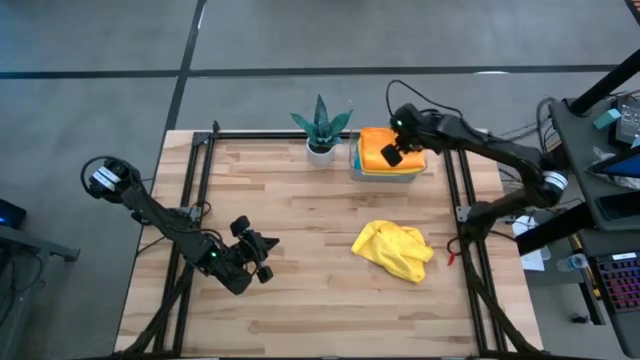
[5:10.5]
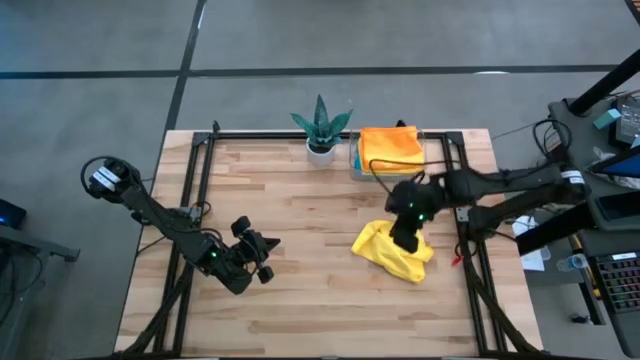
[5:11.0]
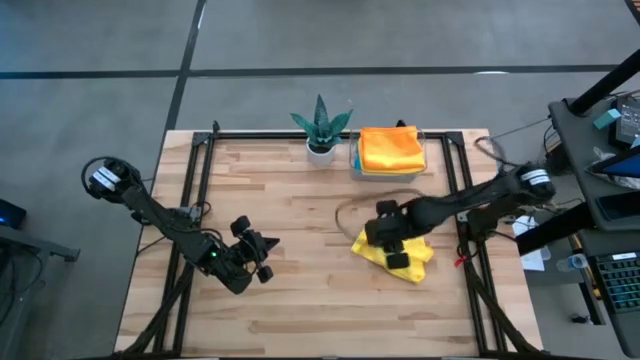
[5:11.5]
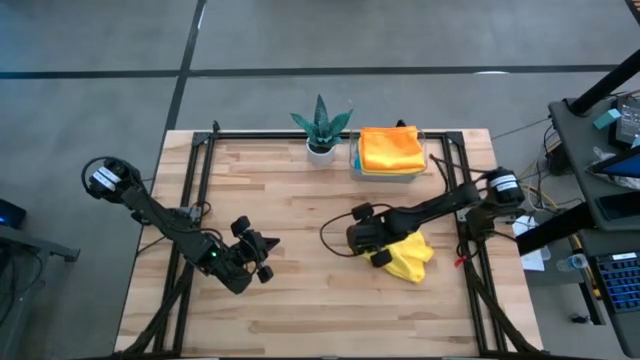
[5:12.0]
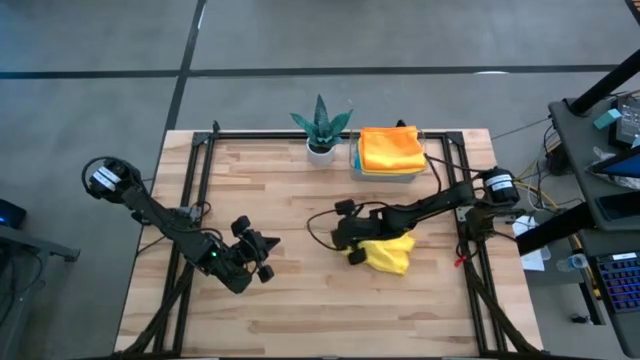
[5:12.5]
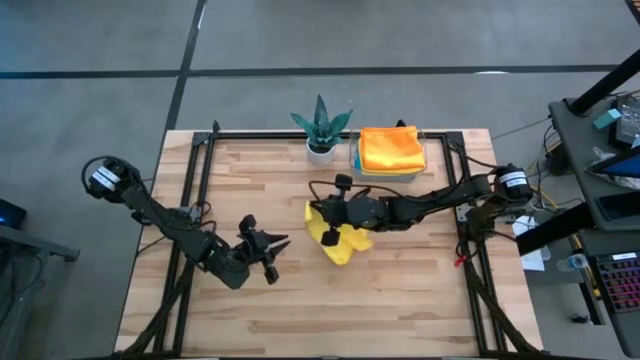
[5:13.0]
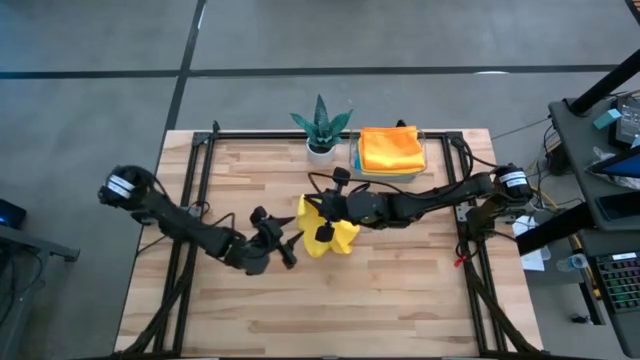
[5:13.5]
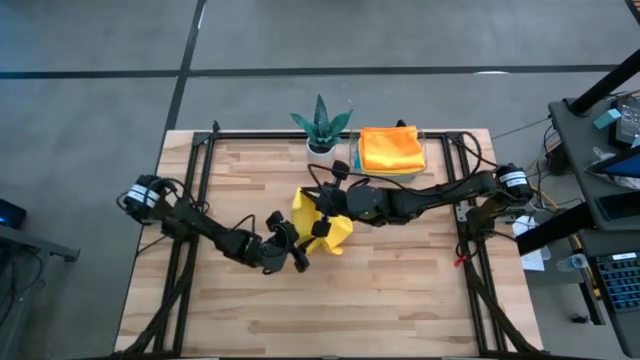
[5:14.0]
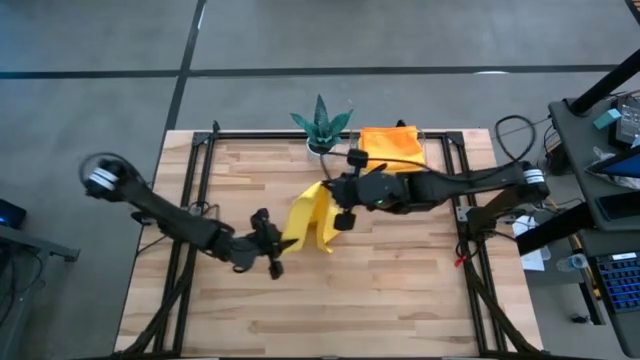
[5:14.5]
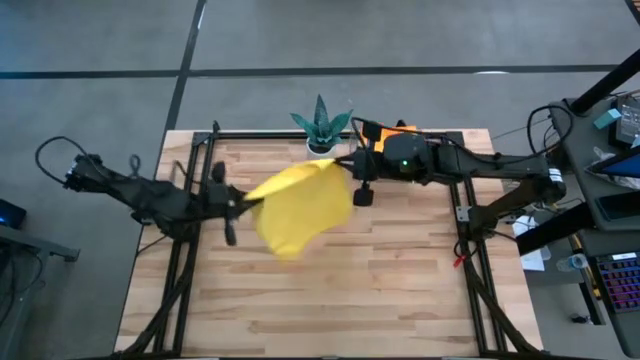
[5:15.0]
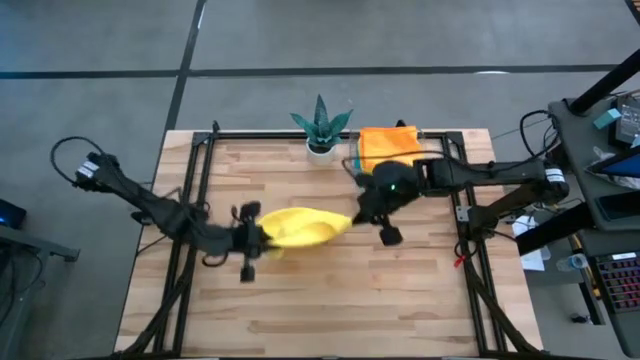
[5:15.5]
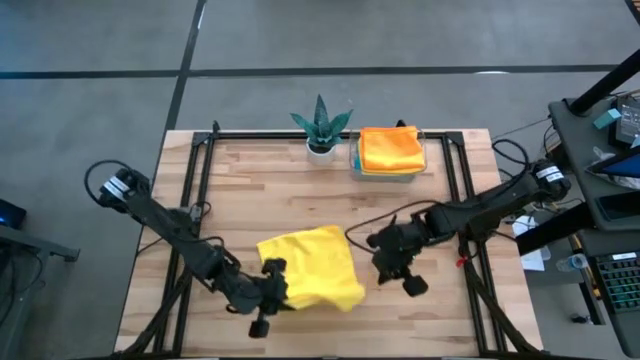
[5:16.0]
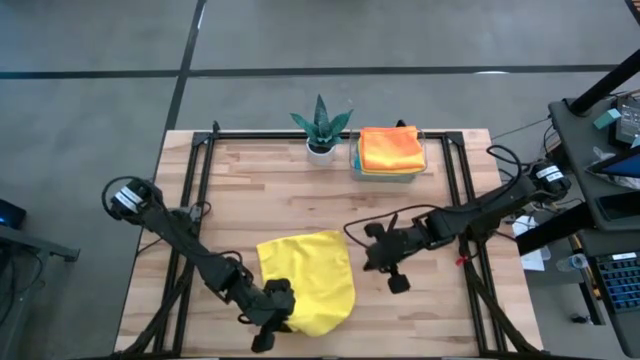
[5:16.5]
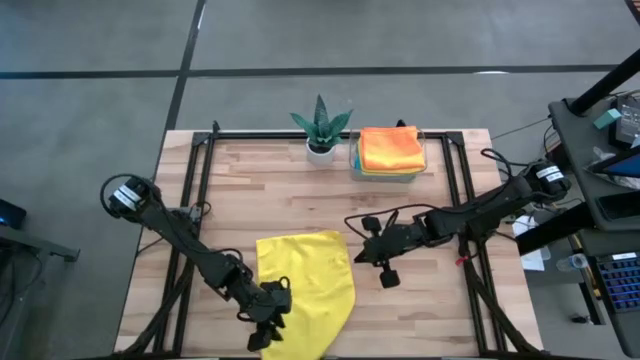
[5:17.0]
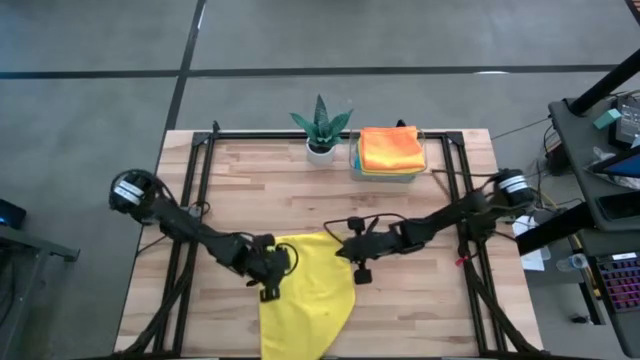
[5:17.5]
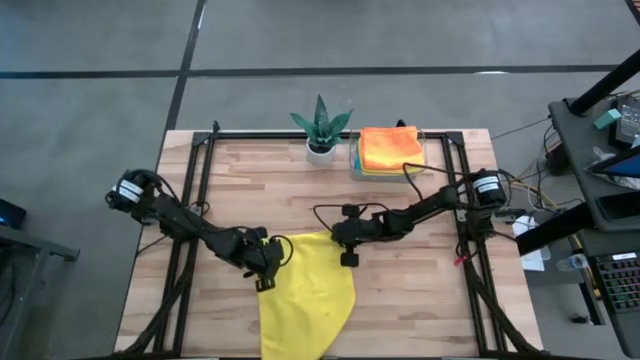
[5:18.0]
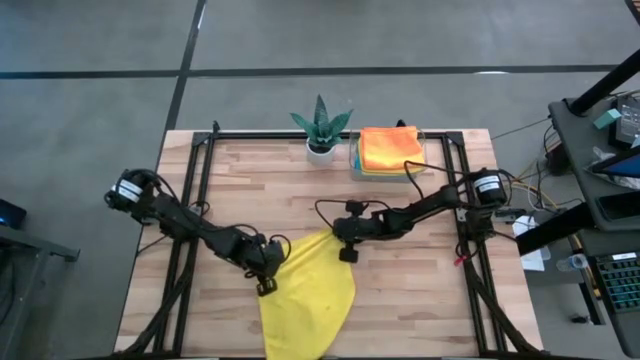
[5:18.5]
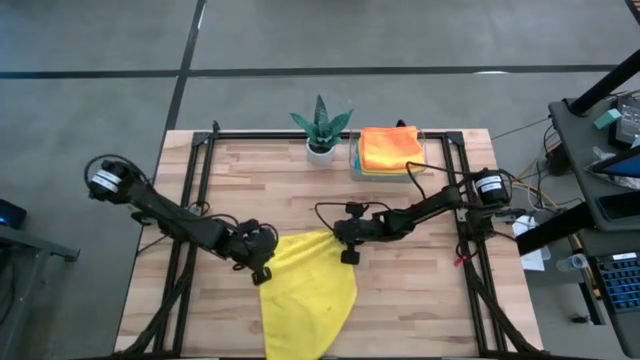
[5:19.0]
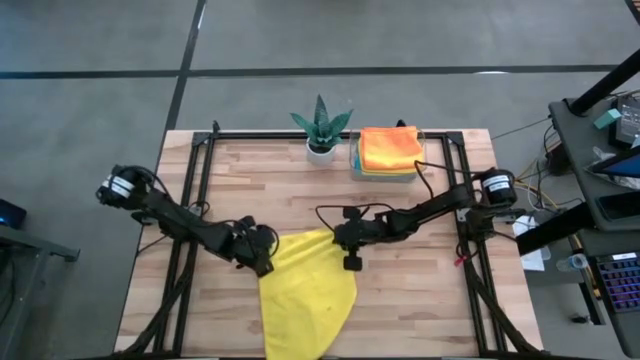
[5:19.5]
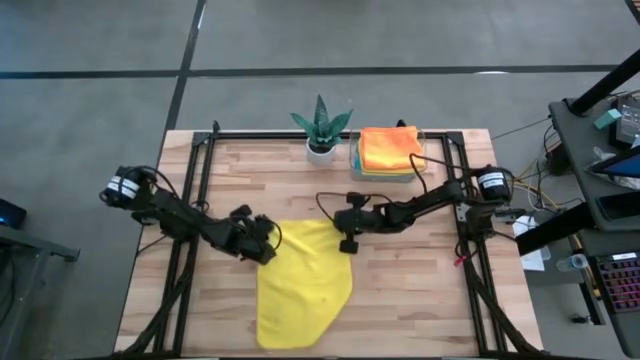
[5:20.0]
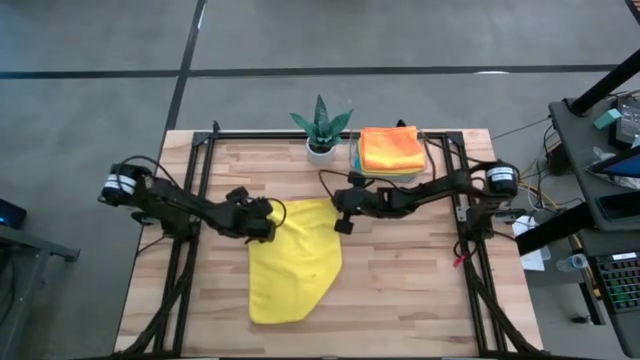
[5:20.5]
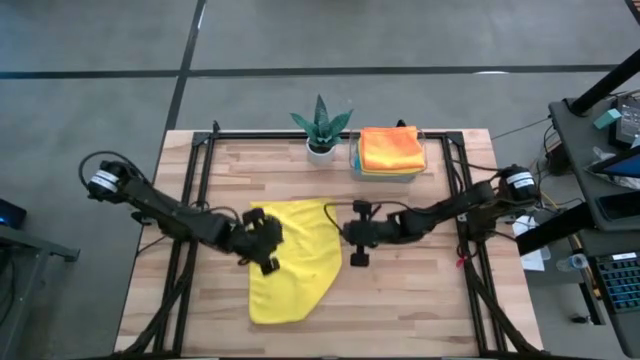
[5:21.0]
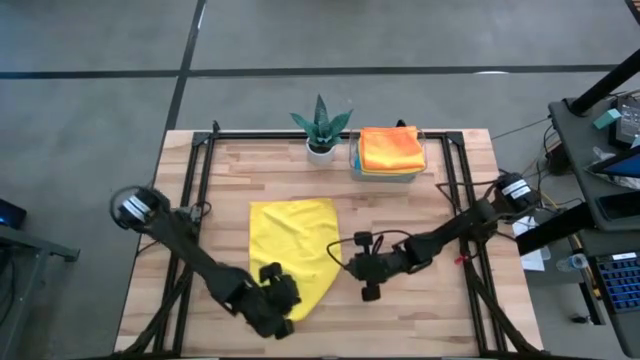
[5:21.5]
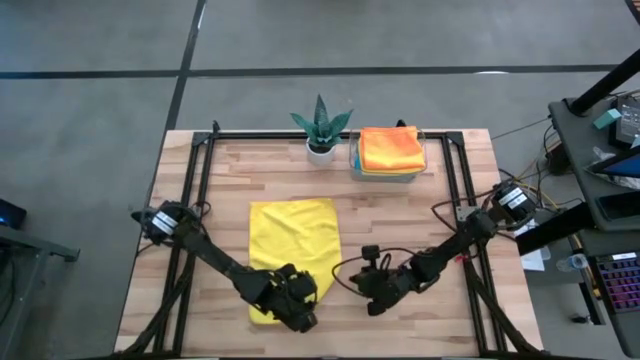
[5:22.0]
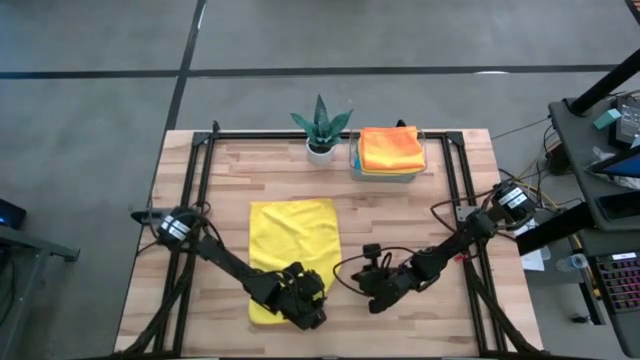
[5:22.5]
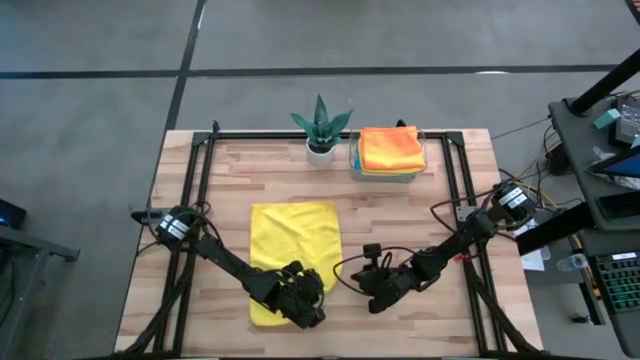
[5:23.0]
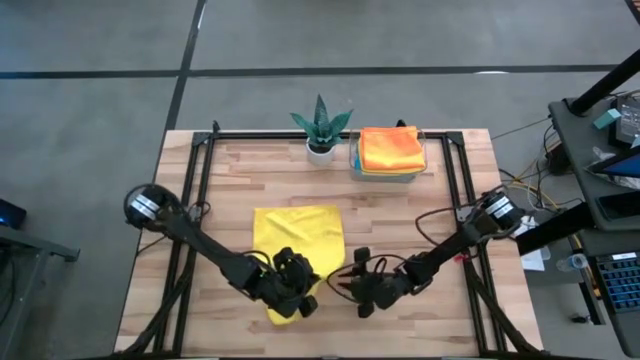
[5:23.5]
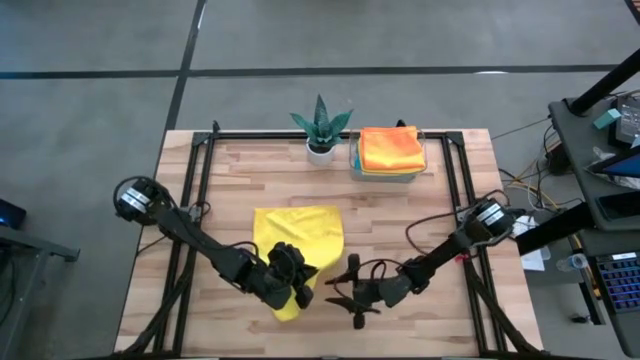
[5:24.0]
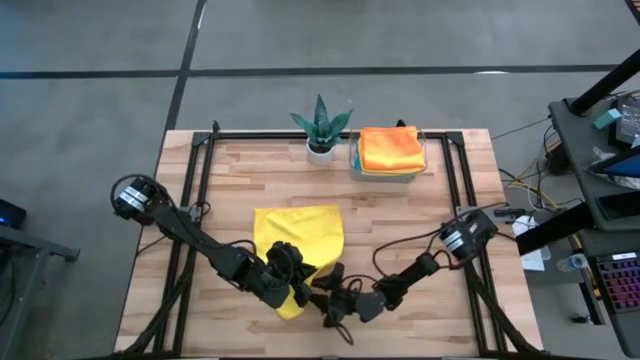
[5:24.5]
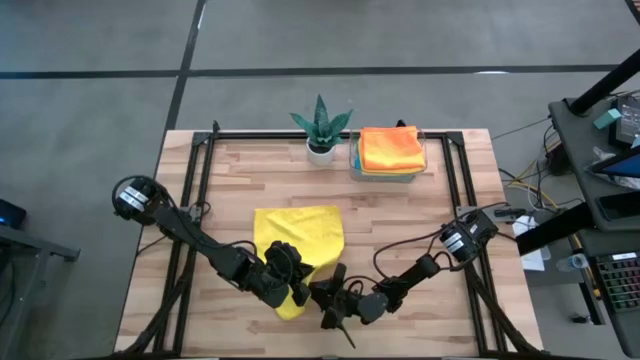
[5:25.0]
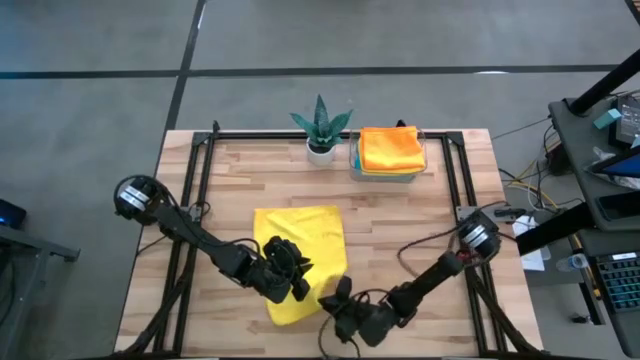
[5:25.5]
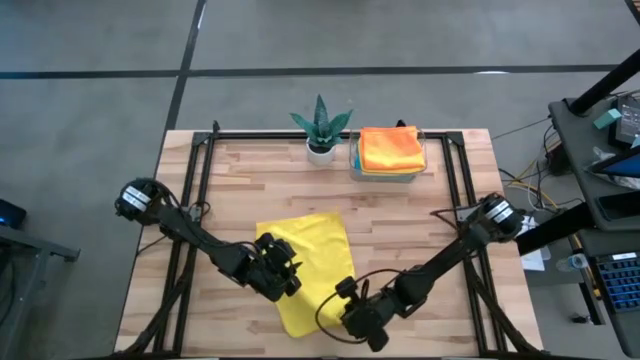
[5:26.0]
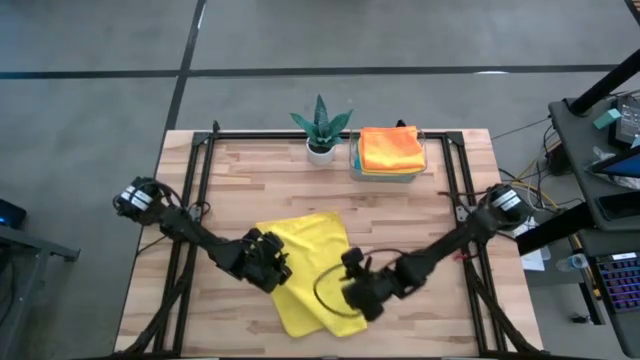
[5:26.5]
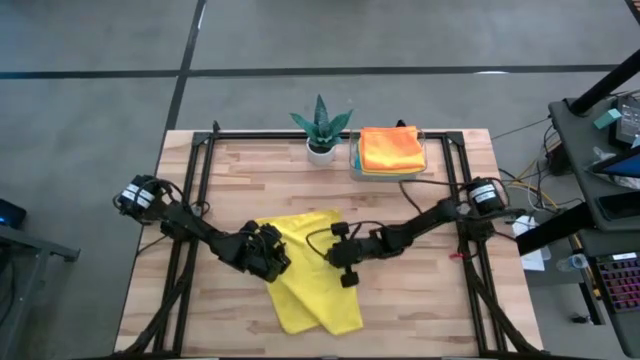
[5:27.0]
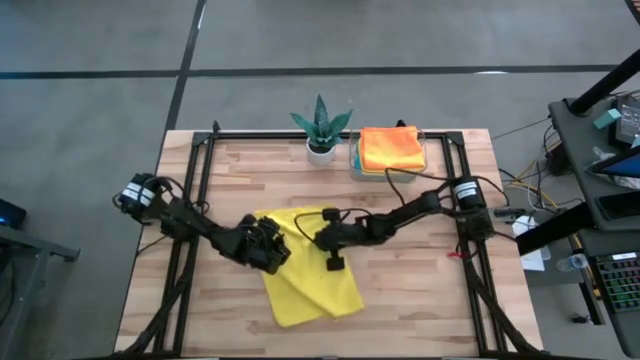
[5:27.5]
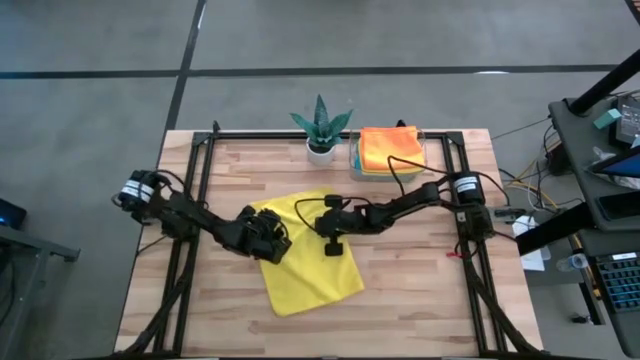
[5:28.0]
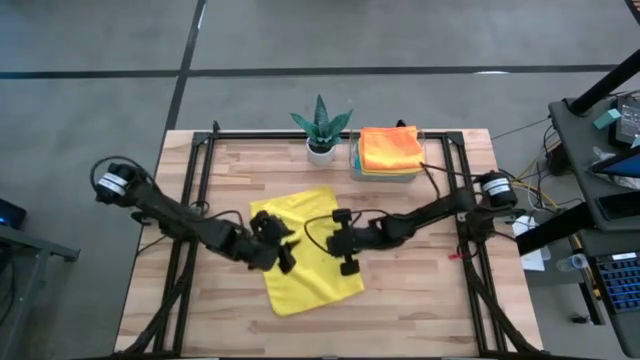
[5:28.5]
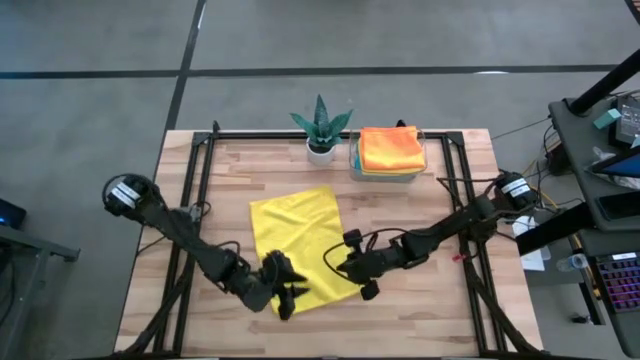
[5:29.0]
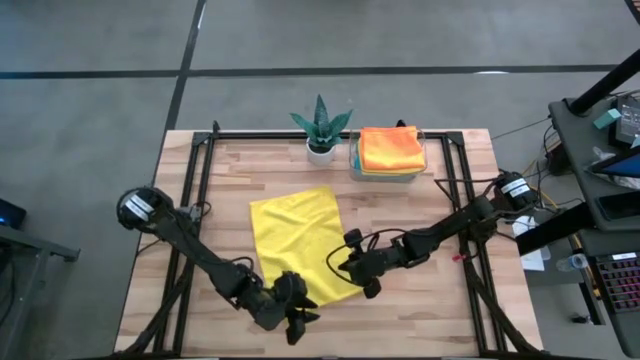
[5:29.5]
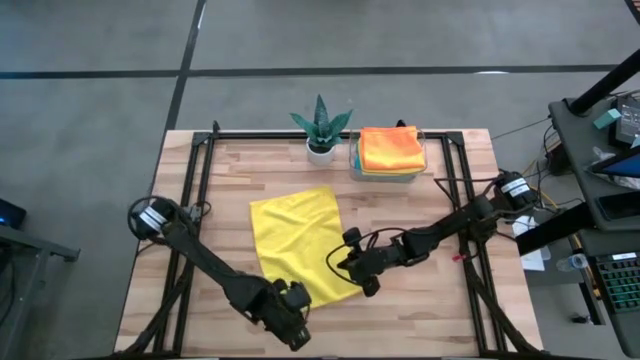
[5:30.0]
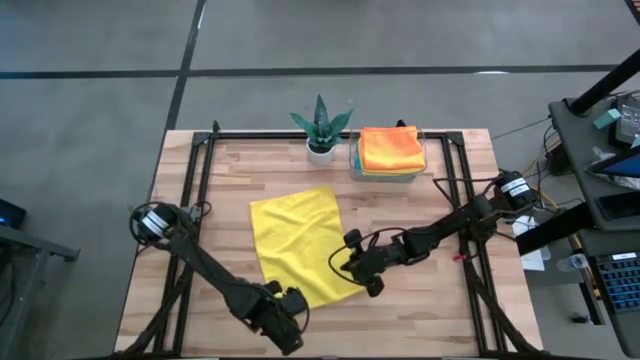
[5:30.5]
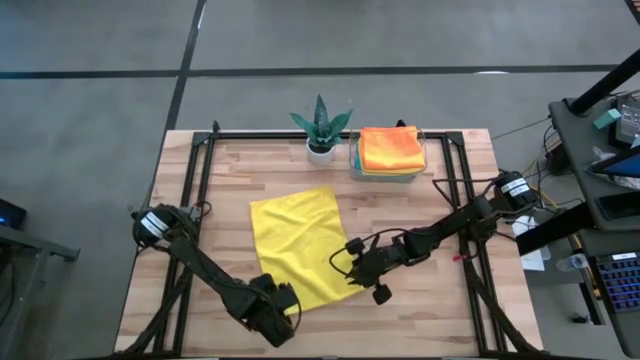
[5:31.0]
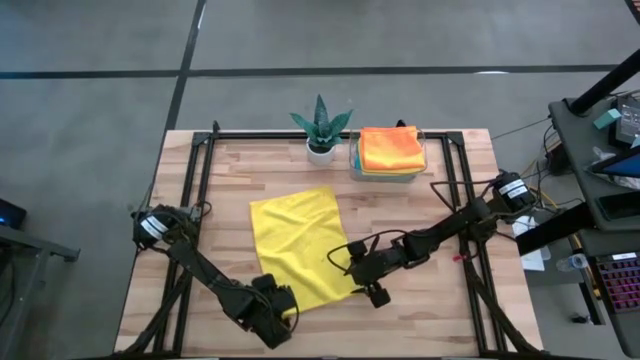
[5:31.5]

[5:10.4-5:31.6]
Task: Fold microfiber towels
Fold the yellow microfiber towel
